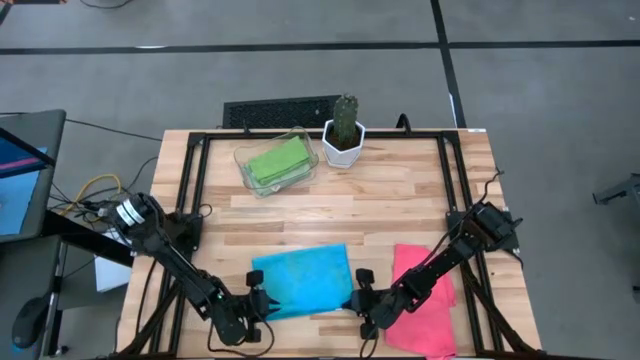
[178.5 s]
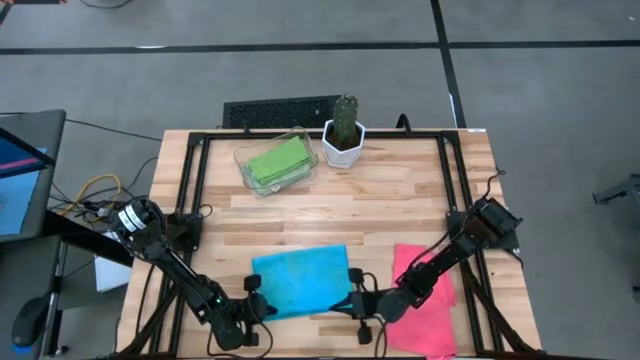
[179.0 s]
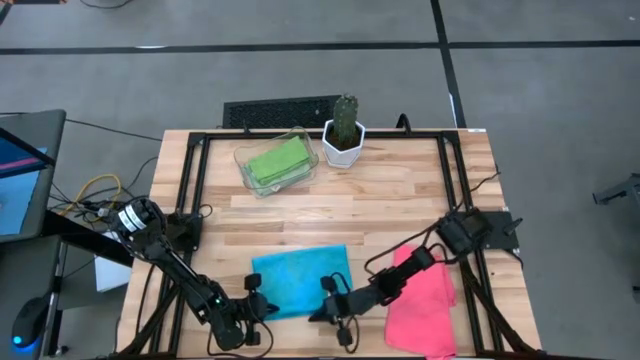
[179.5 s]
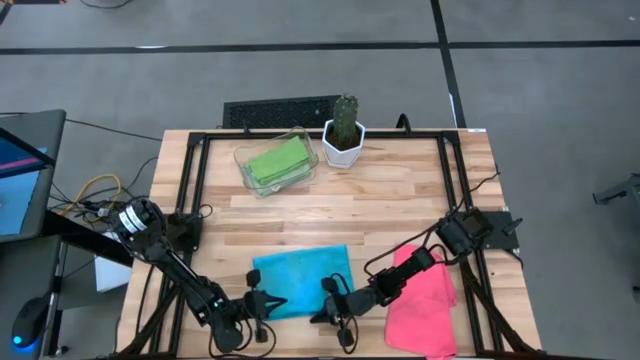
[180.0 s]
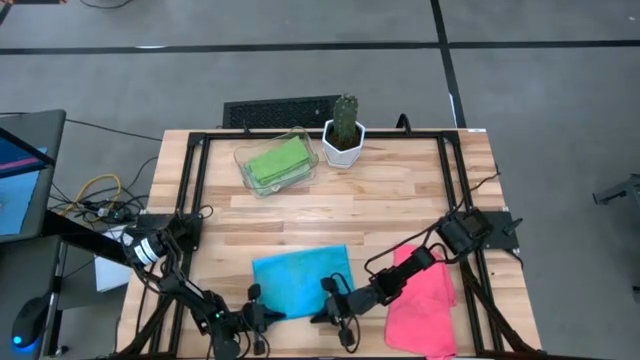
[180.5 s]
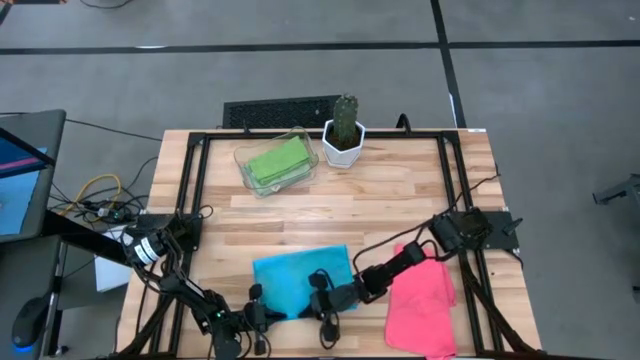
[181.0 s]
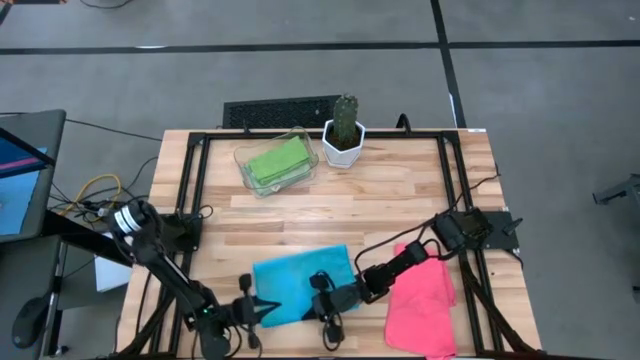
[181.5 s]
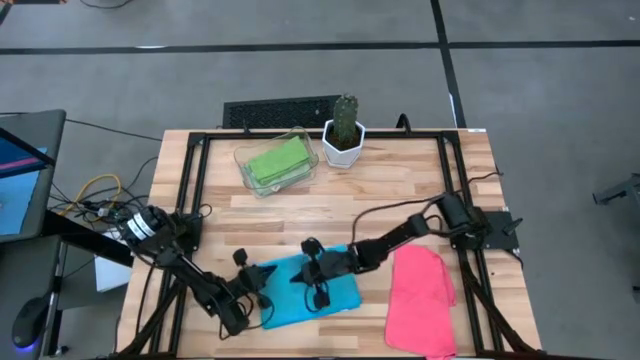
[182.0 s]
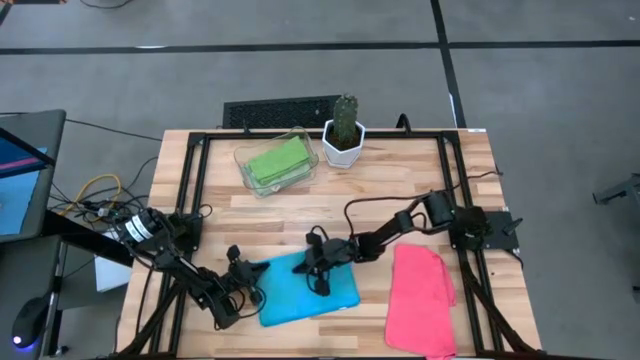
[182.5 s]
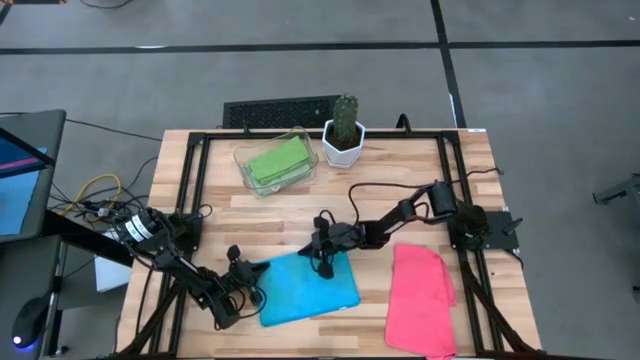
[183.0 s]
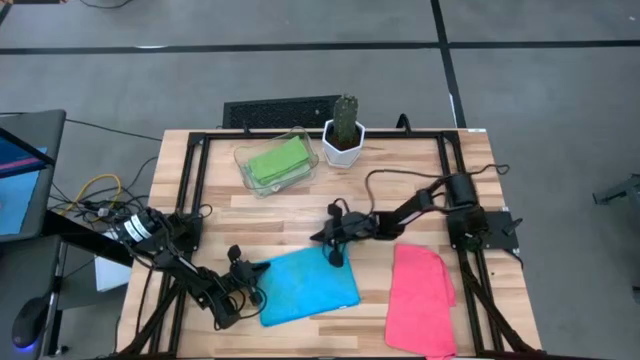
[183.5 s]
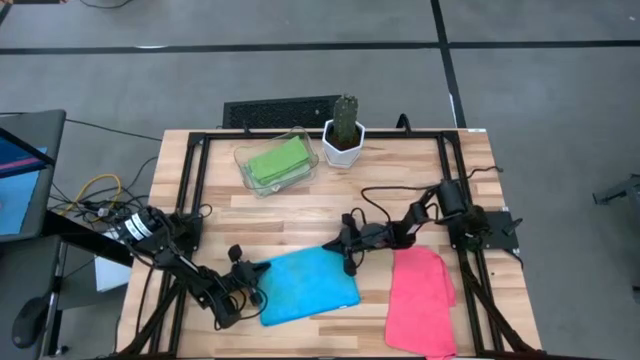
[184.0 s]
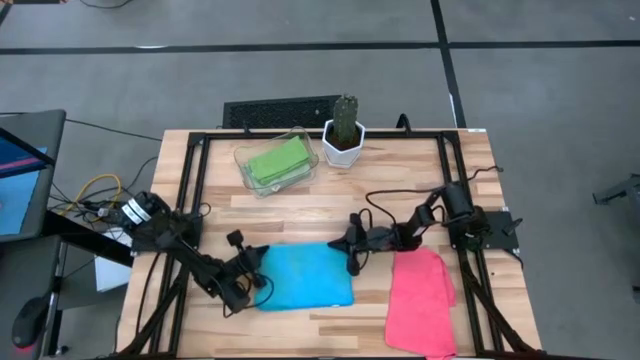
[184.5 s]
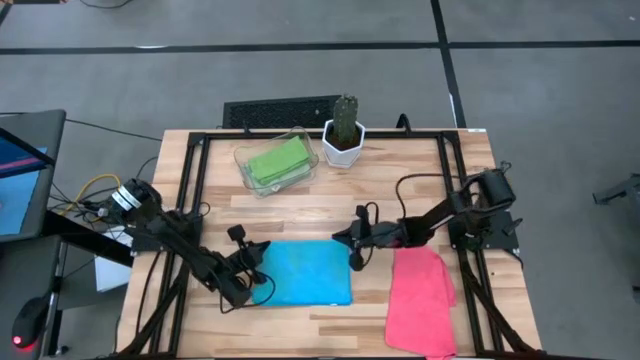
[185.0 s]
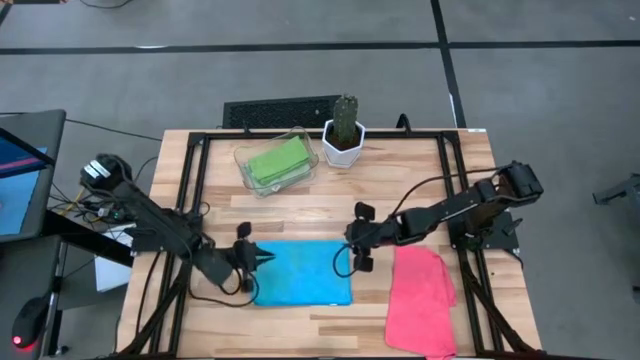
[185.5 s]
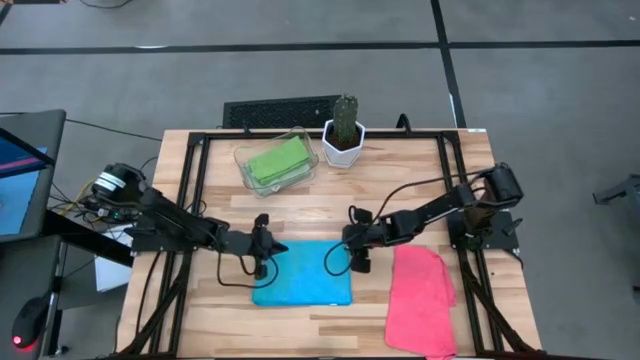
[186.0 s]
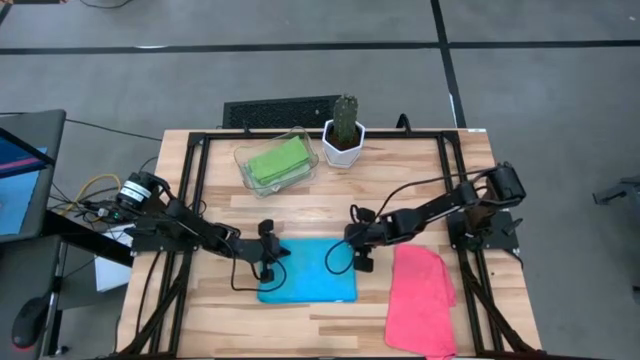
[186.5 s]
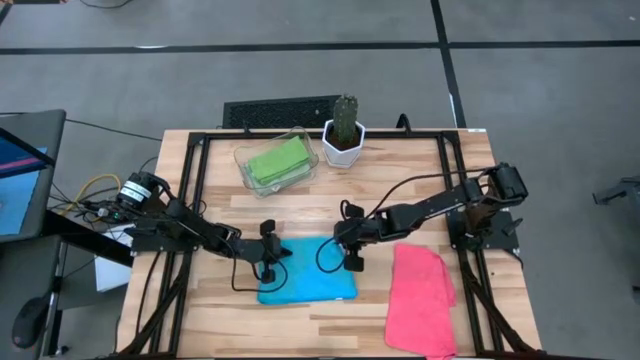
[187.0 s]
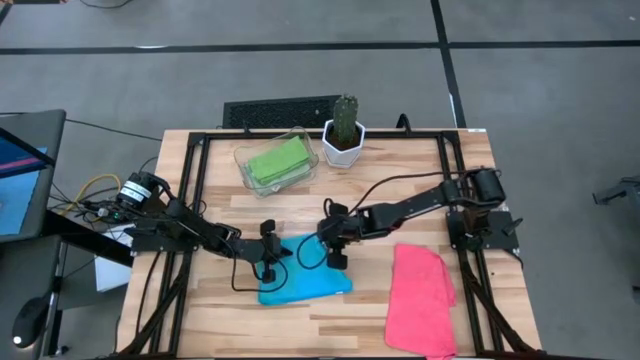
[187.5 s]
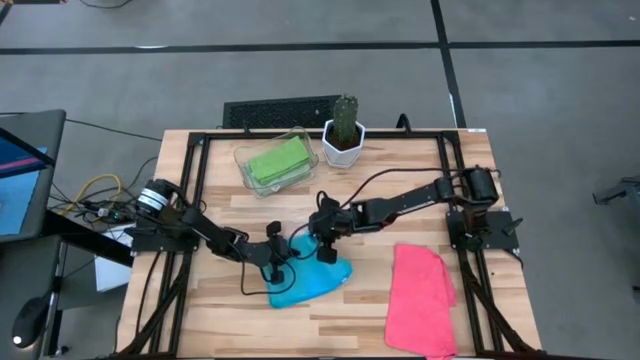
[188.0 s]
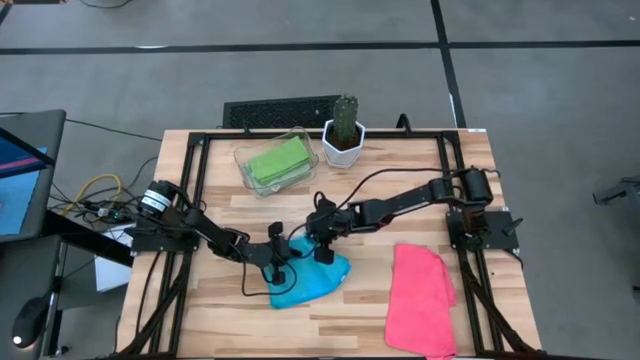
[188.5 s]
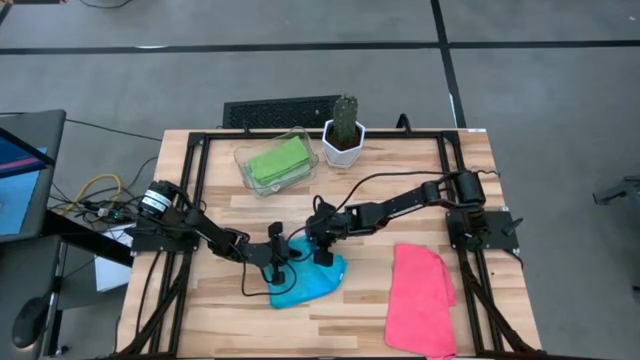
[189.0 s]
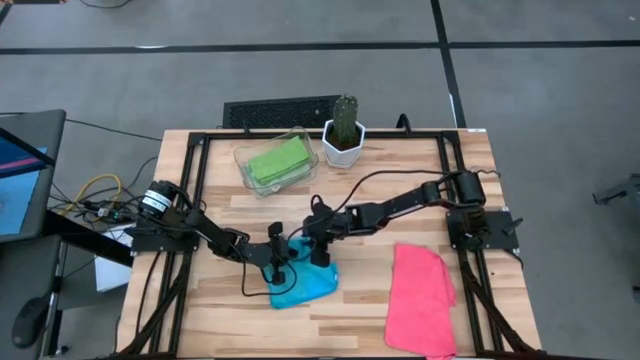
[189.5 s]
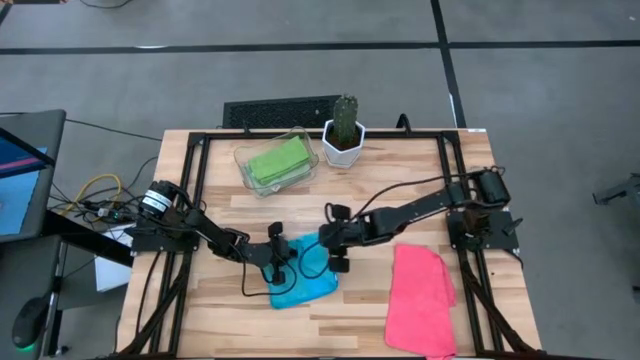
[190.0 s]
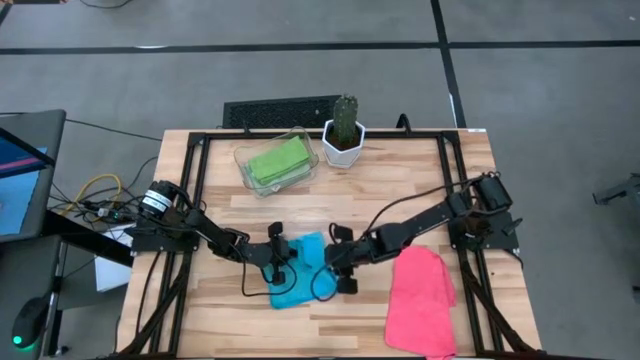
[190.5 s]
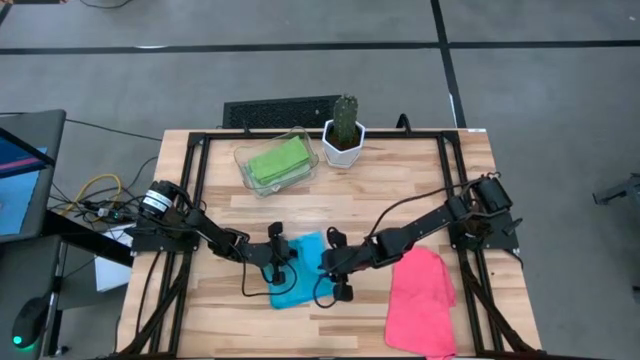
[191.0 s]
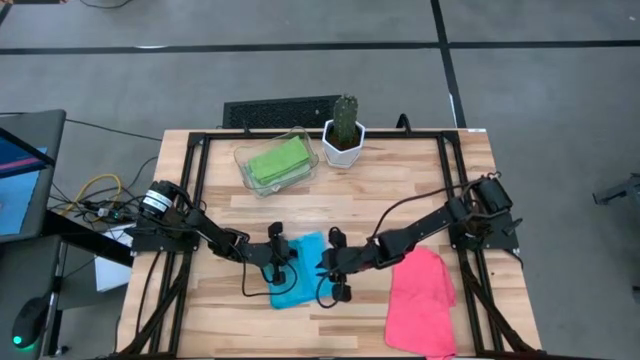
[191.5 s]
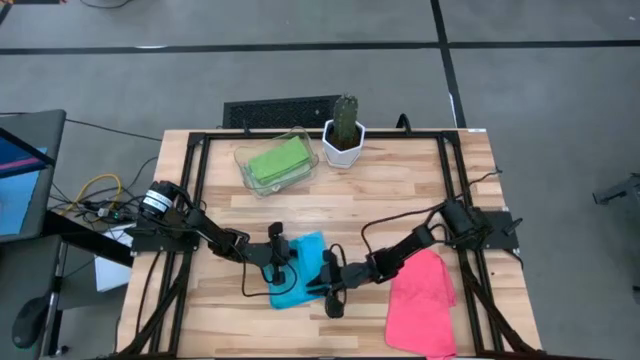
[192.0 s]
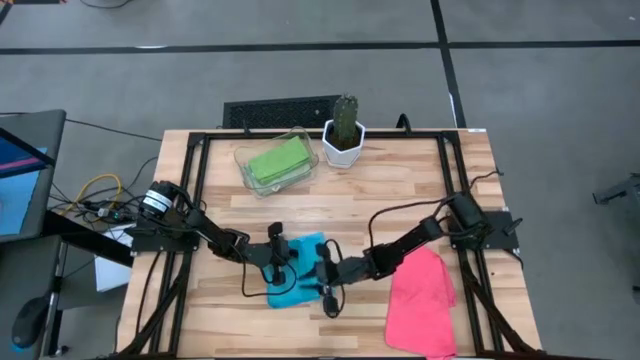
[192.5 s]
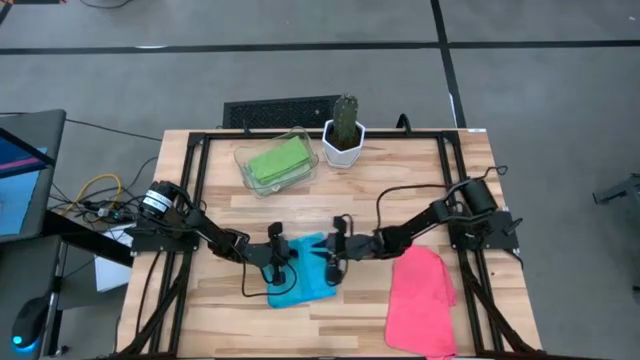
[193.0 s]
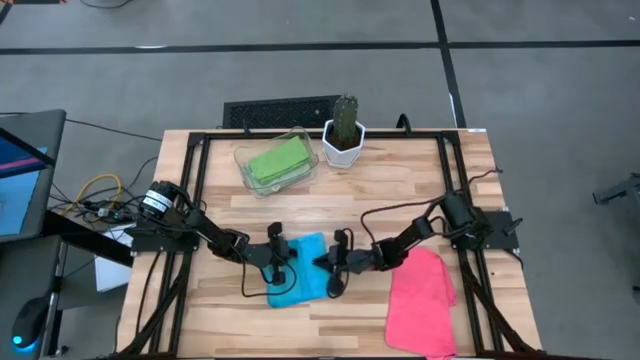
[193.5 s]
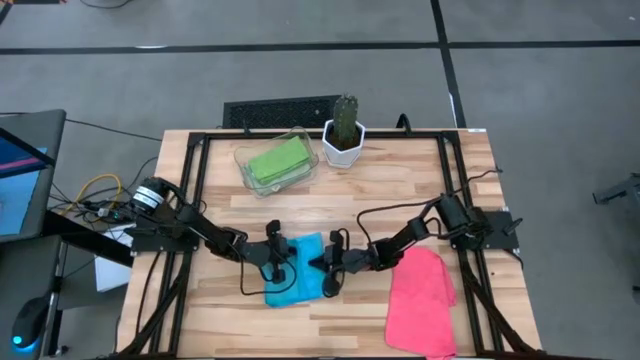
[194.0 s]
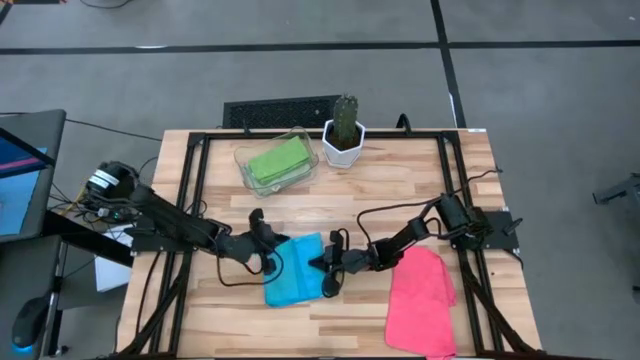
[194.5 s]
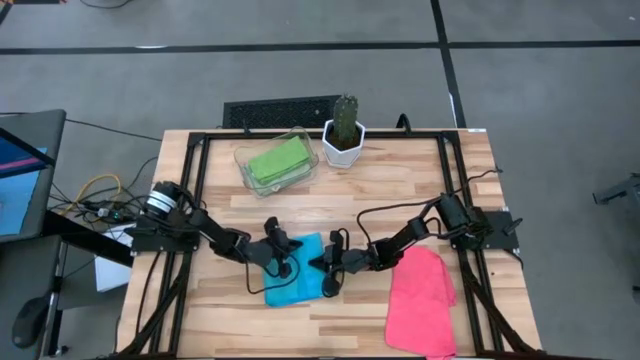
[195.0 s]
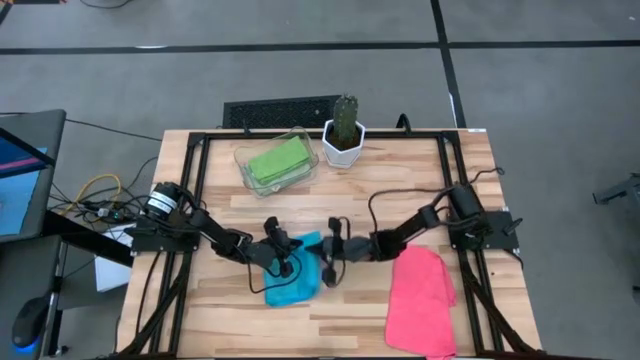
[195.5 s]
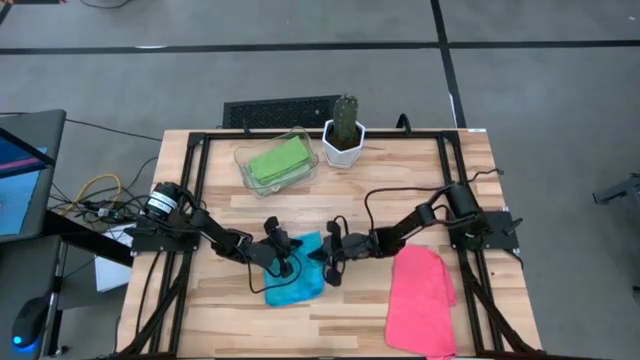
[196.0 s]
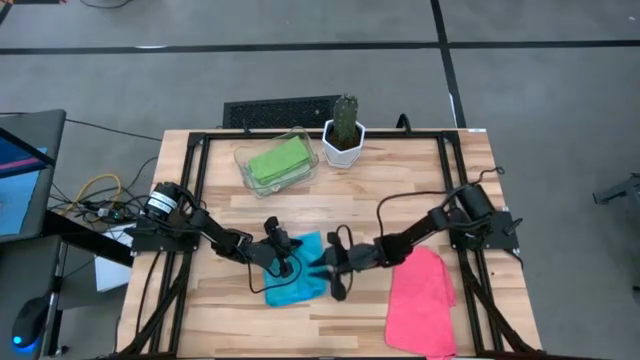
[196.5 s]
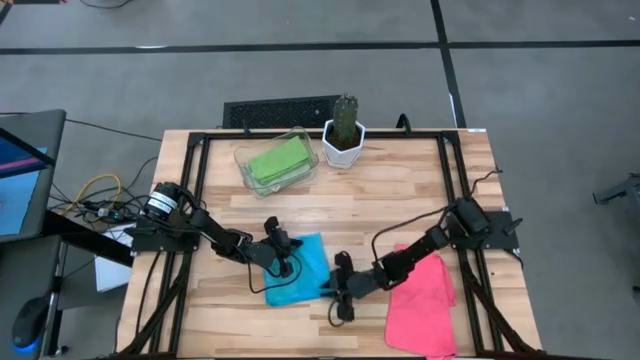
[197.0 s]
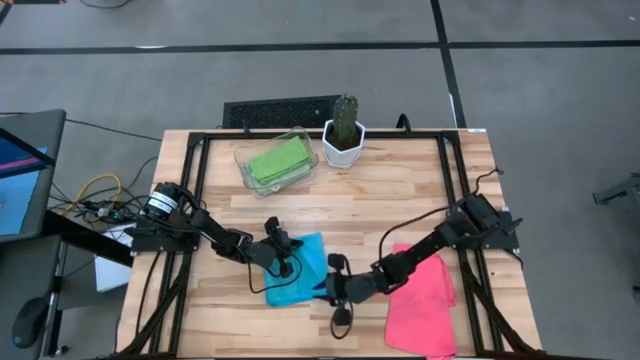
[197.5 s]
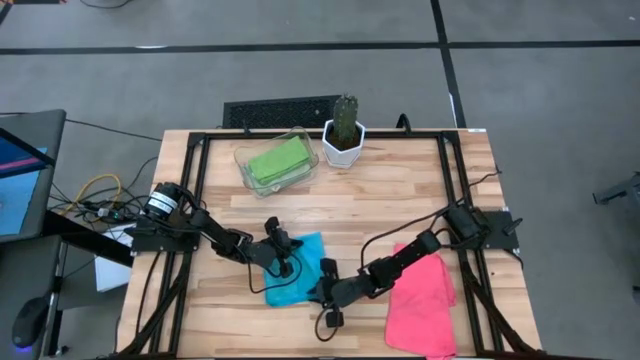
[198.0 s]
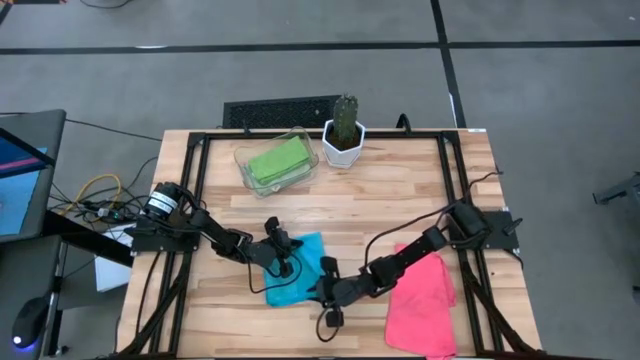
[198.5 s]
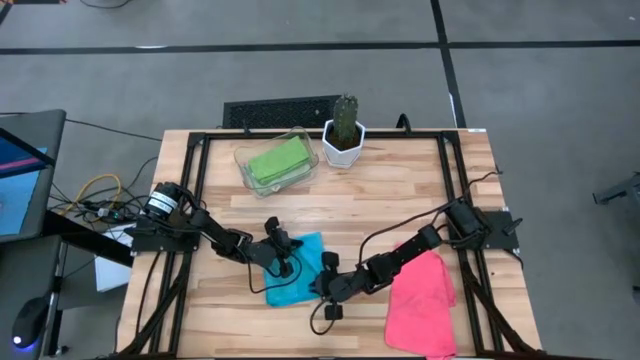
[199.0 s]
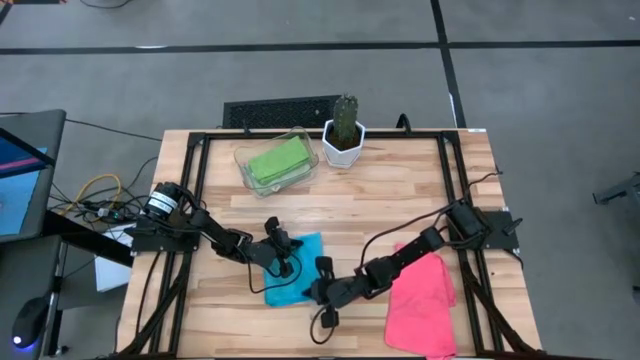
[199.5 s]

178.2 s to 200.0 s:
Task: Fold microfiber towels
Fold the blue microfiber towel

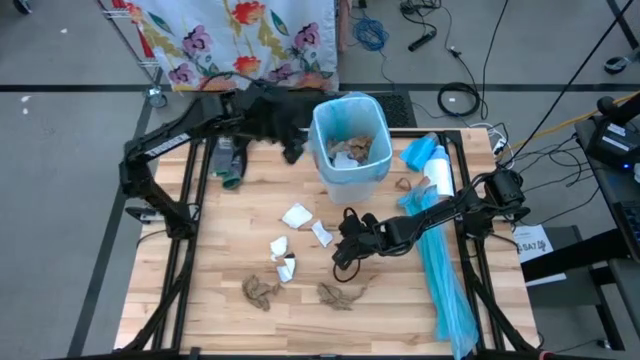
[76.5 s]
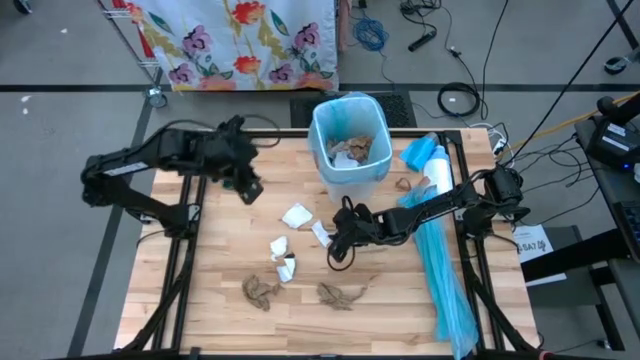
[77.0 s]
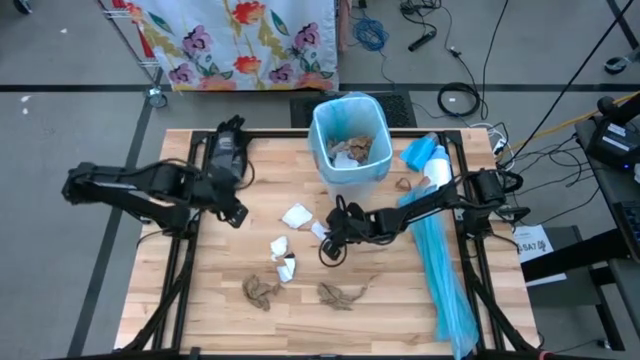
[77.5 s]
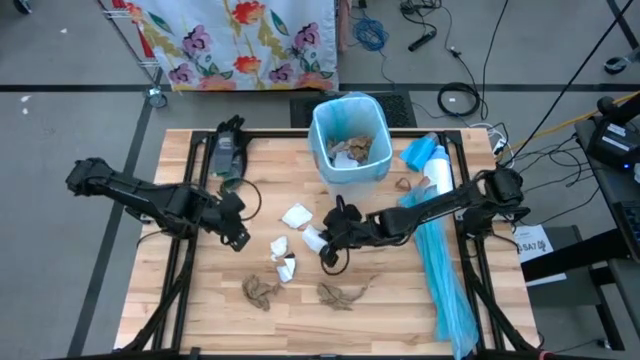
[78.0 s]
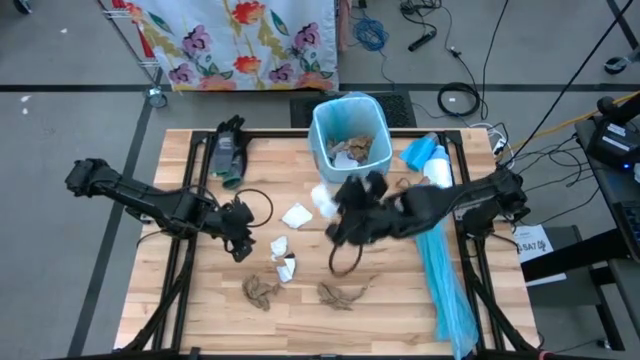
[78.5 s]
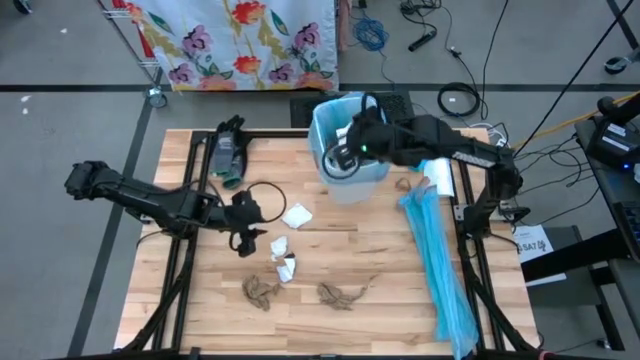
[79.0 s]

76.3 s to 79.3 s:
Task: place trash/remove bag and relplace
Put the piece of magazine into the trash bin
